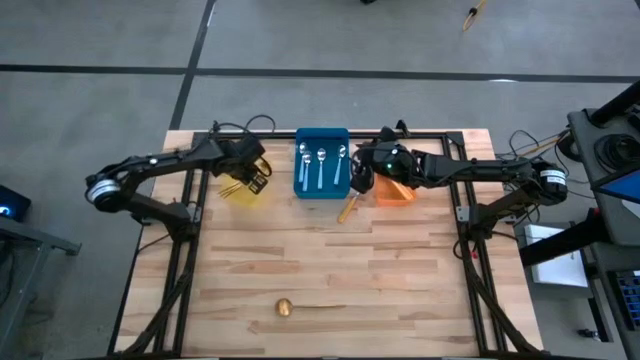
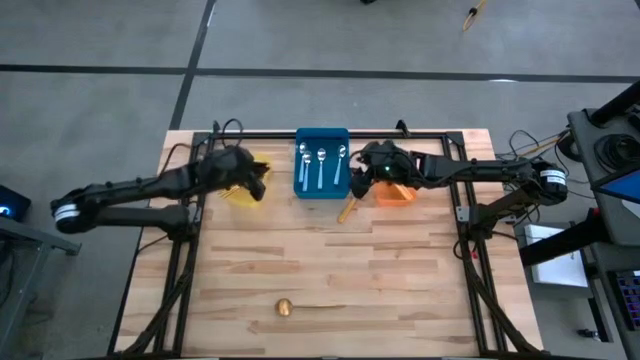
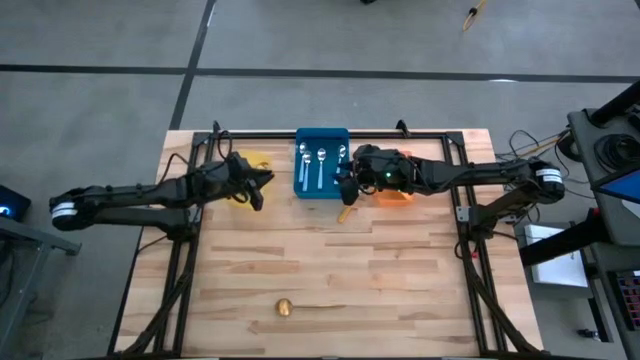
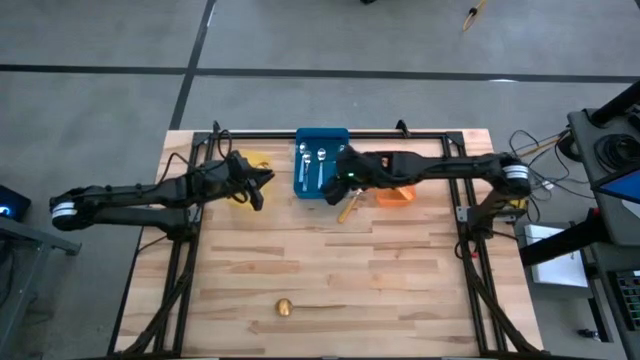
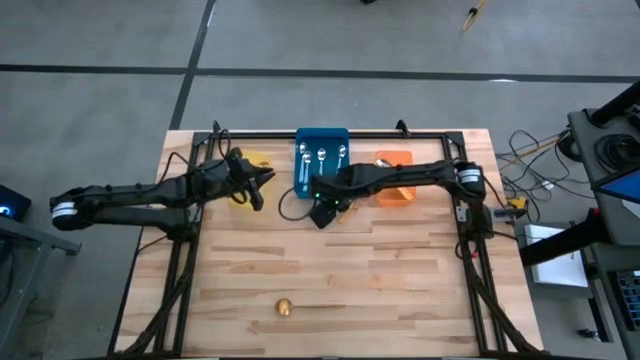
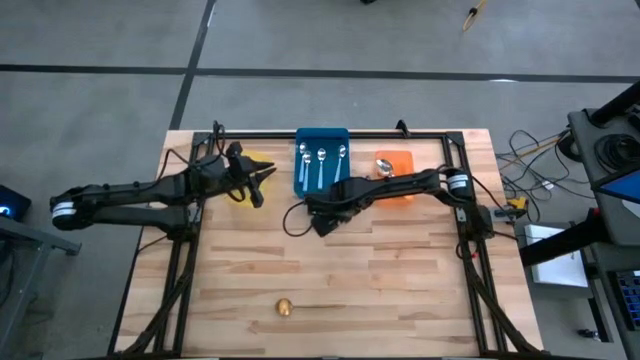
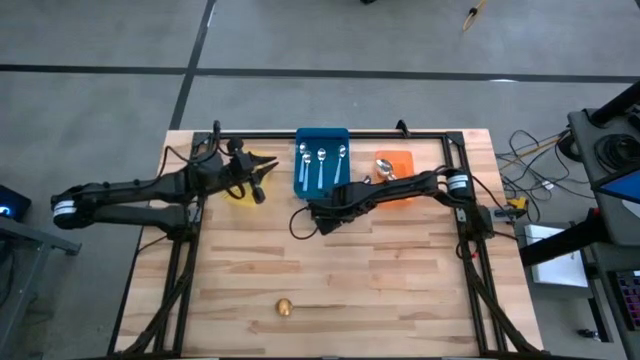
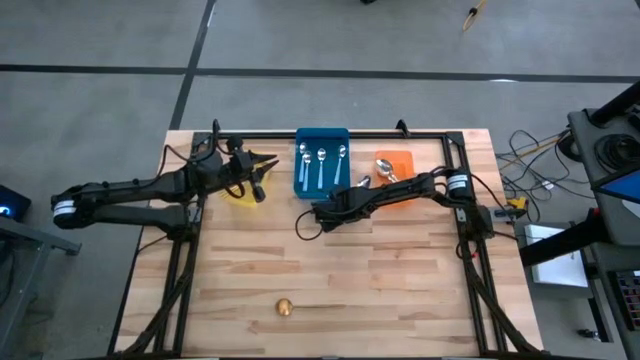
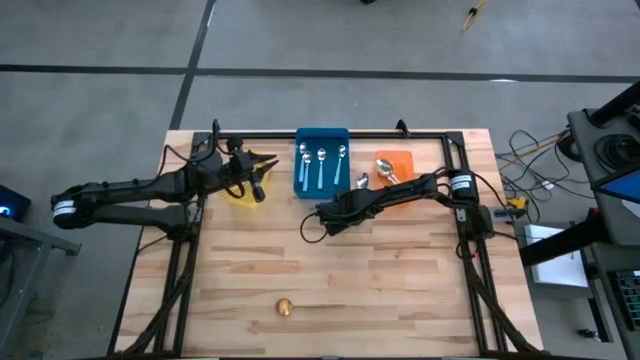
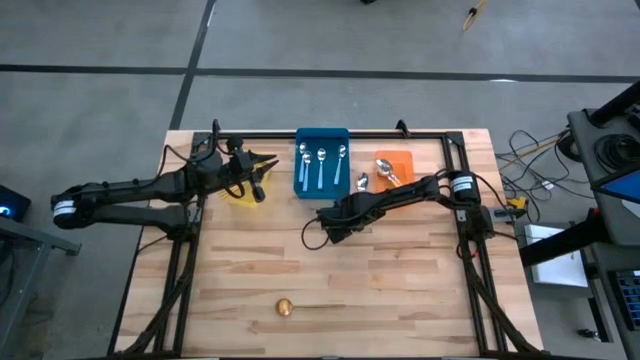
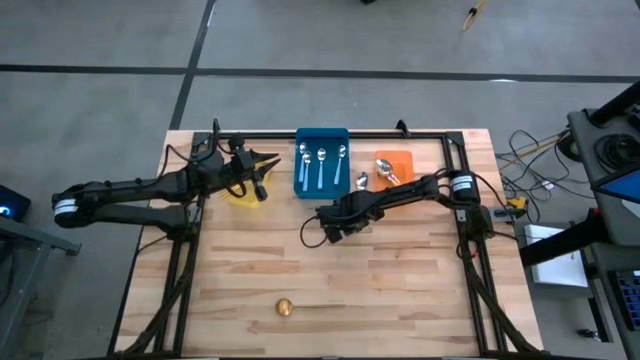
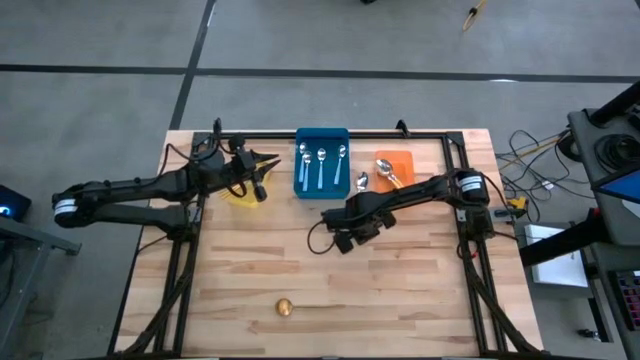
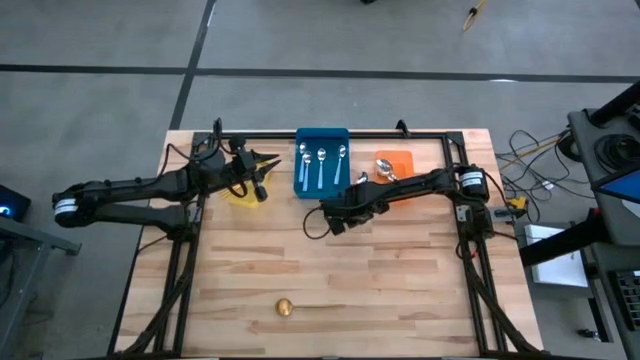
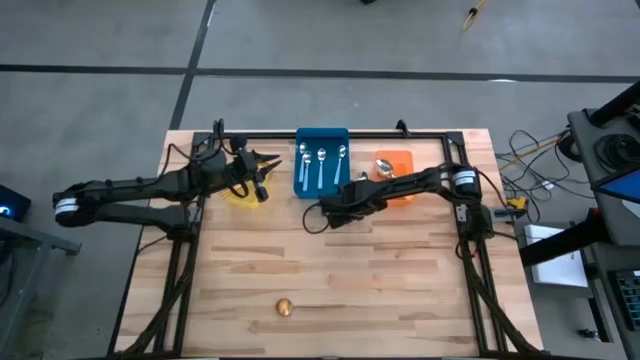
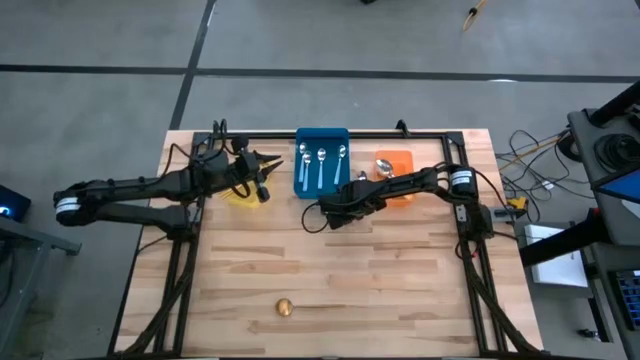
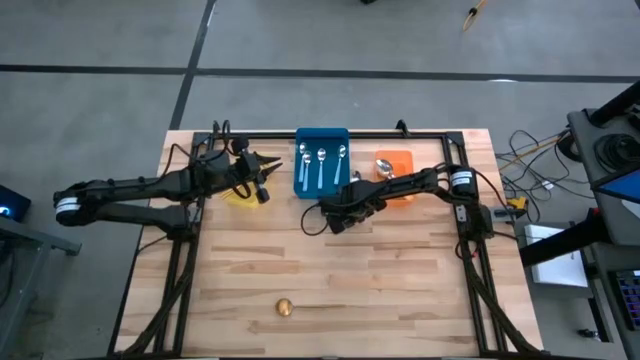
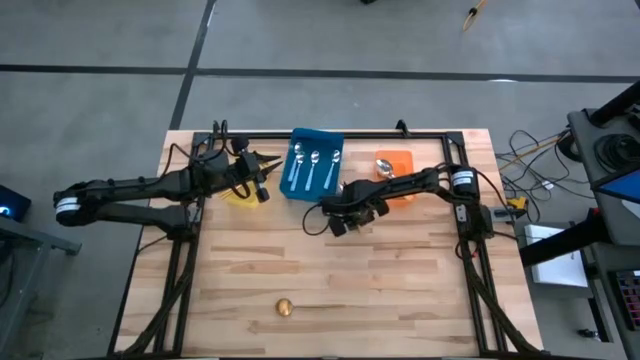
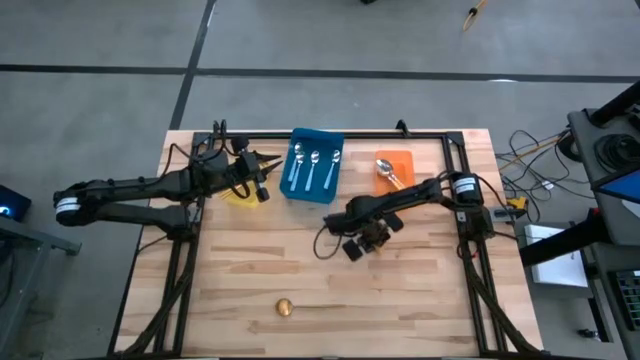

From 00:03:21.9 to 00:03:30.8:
Task: Sort silverware by color (type)
Put the yellow spoon into the orange bin

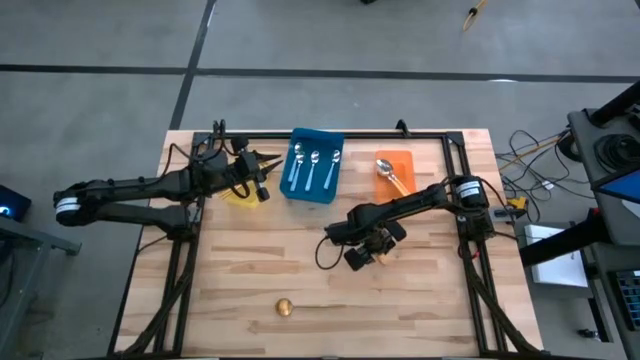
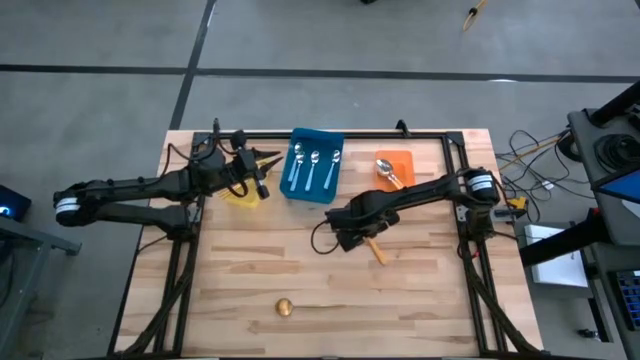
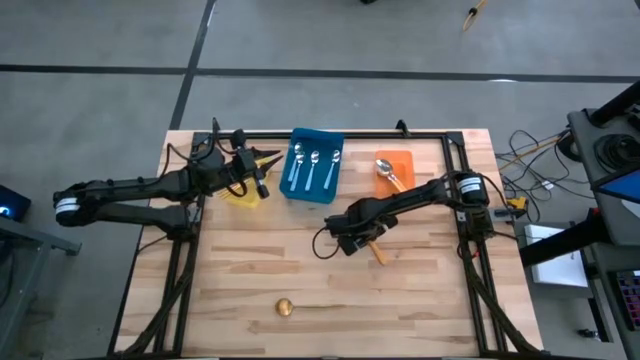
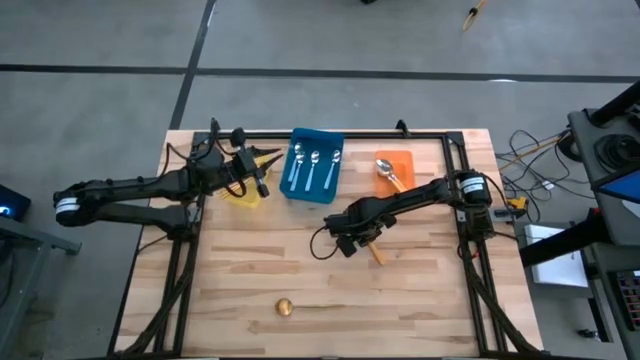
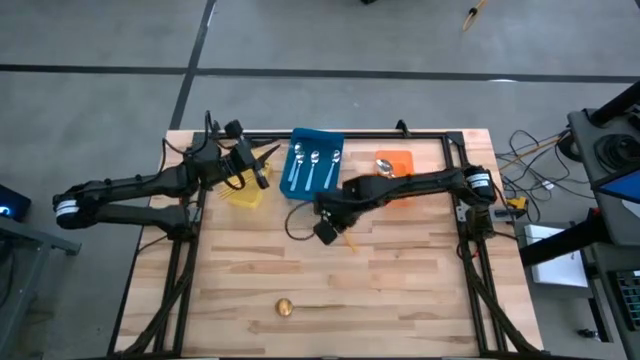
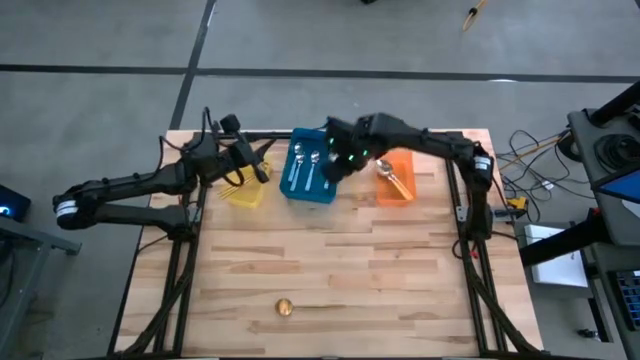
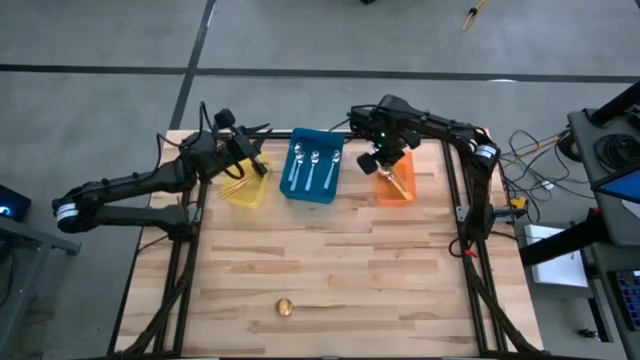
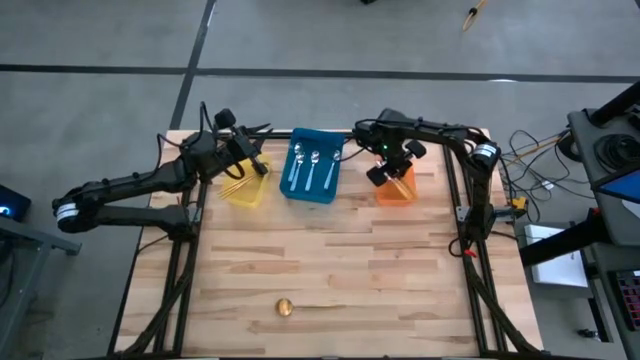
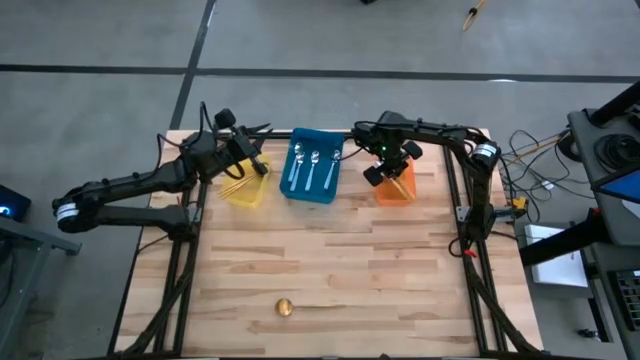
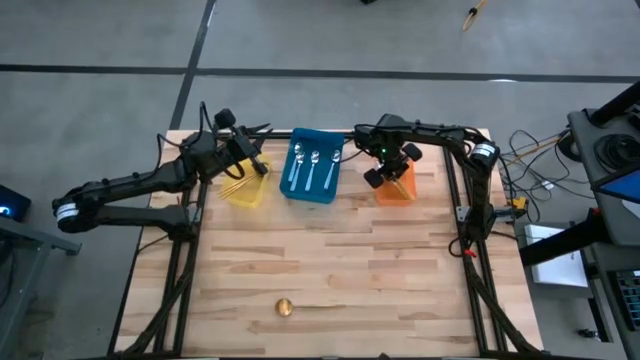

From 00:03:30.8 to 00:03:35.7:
Put the yellow spoon into the orange bin

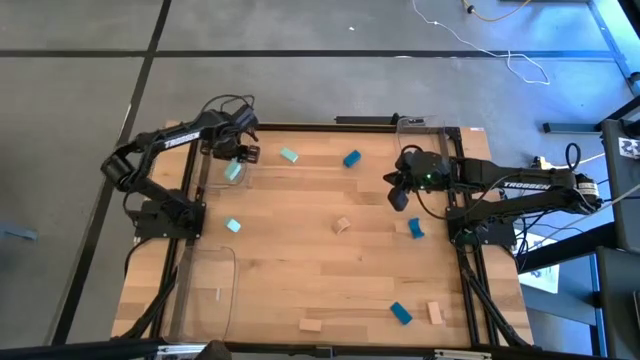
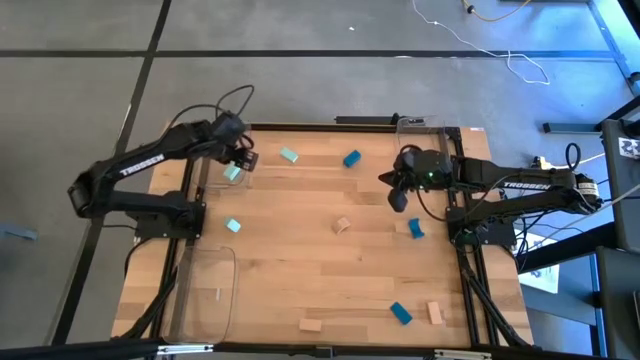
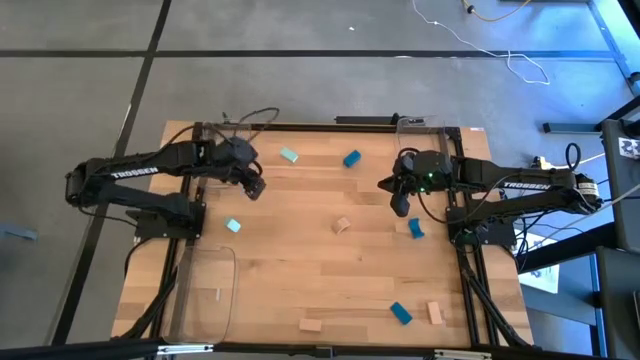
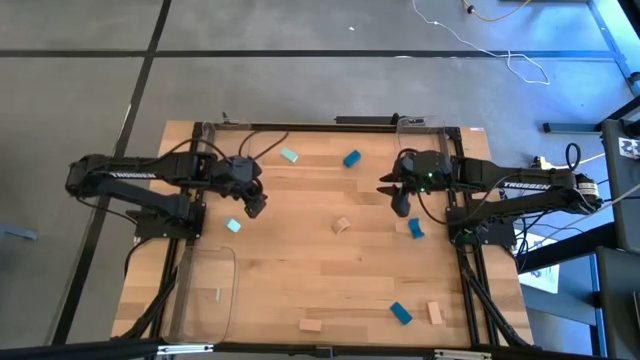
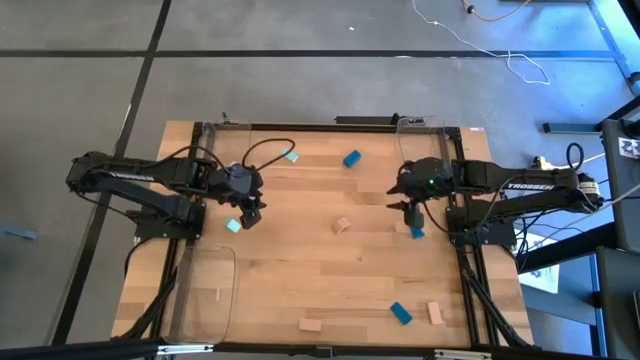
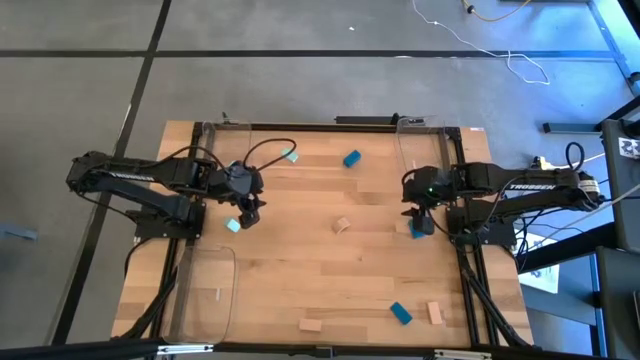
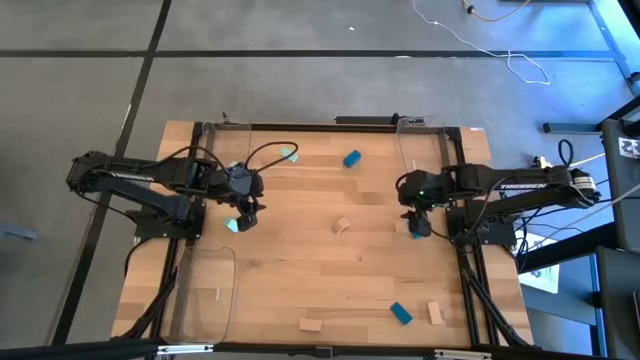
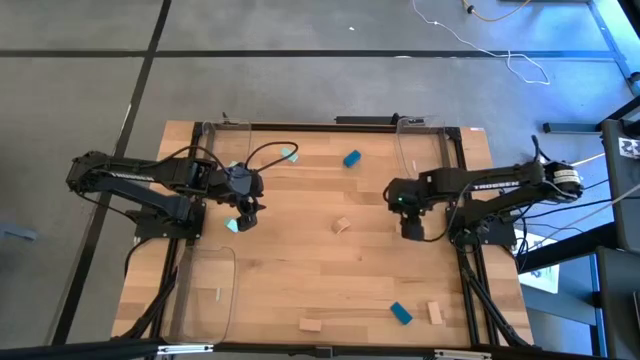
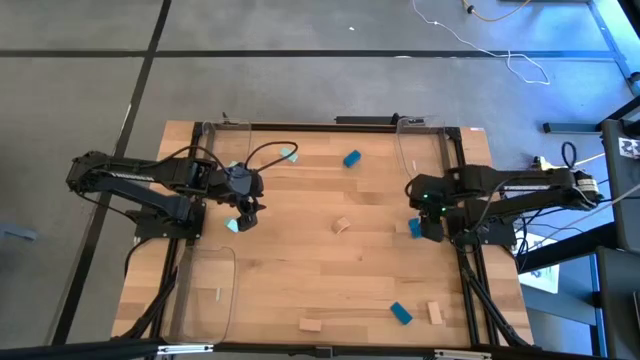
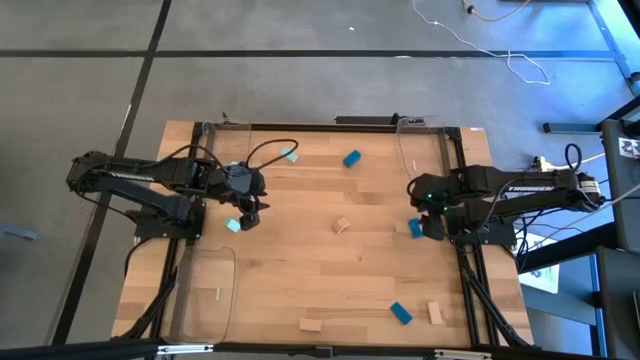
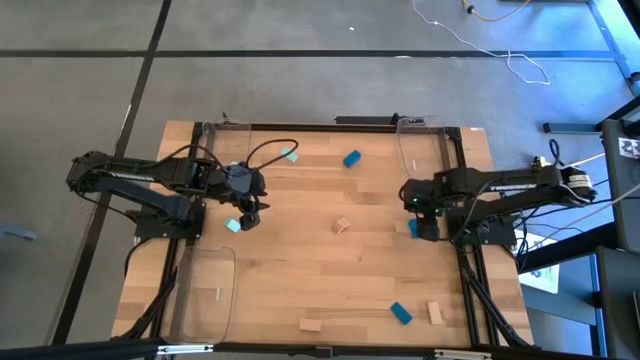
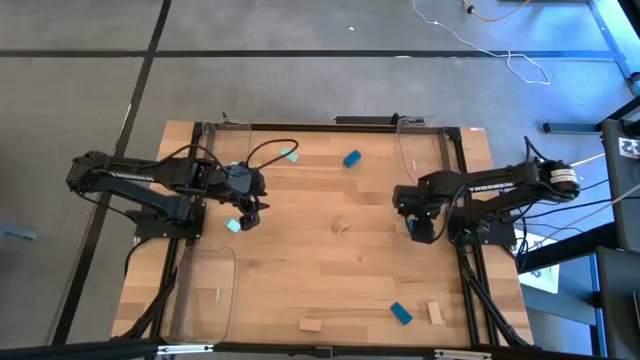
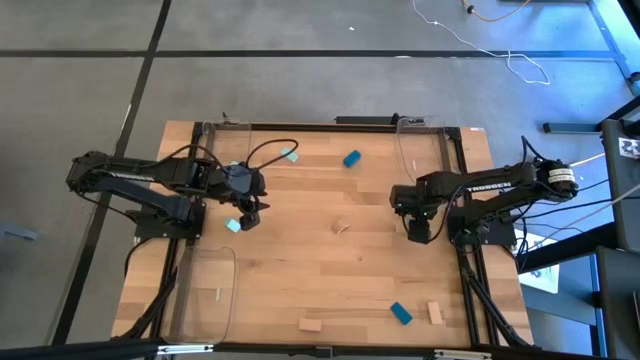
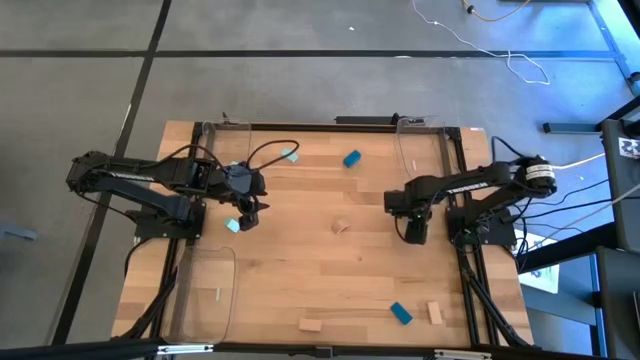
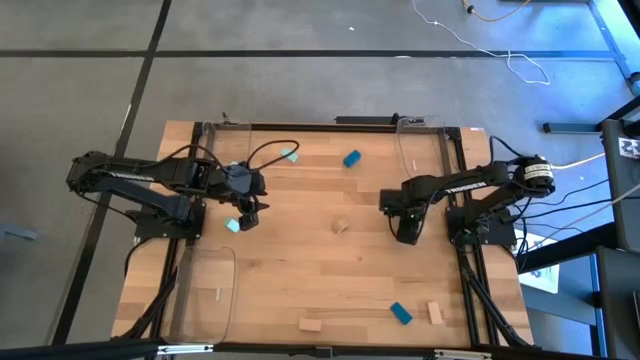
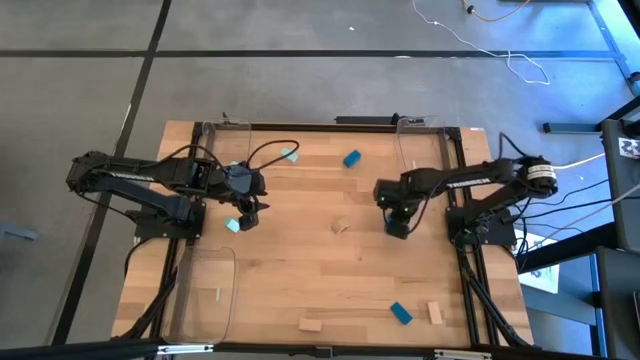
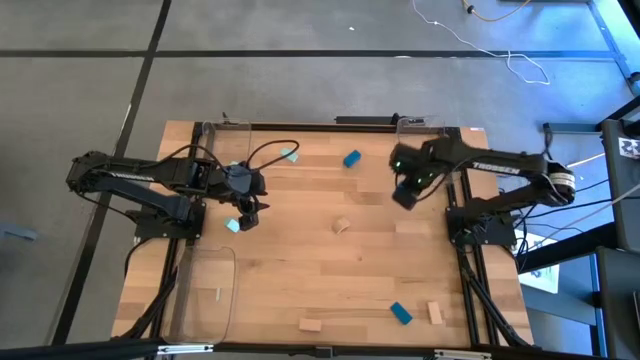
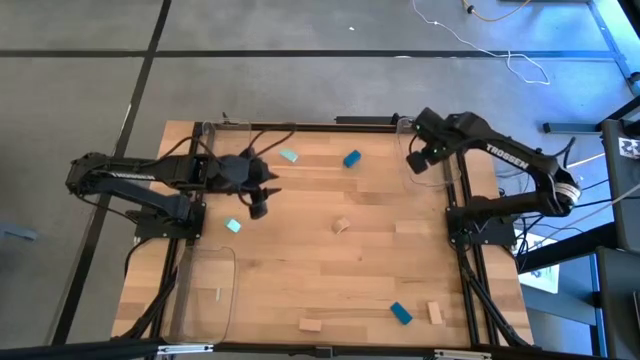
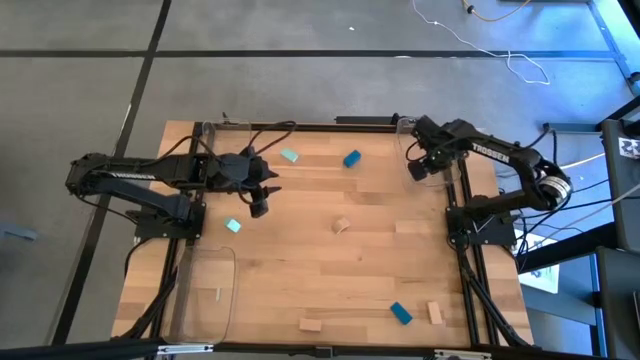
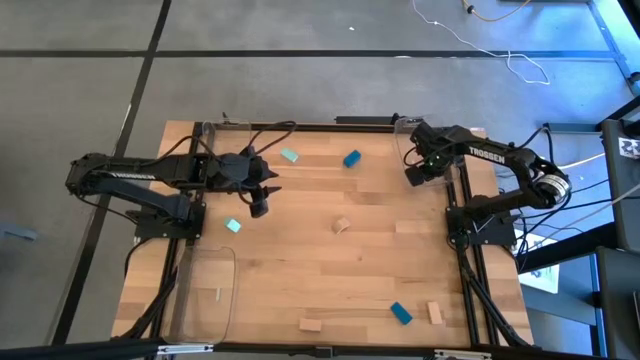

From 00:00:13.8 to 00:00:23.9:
Task: Sort & place blocks by color
Put the right blue block into the top right transparent bin
